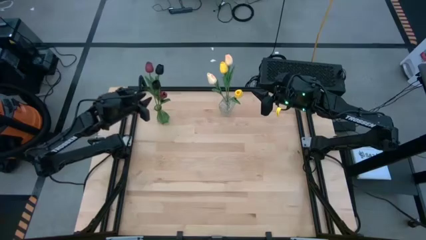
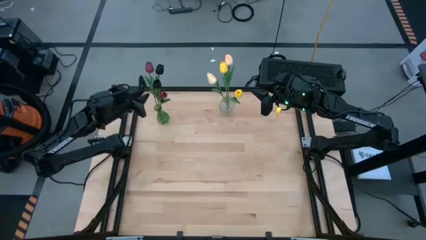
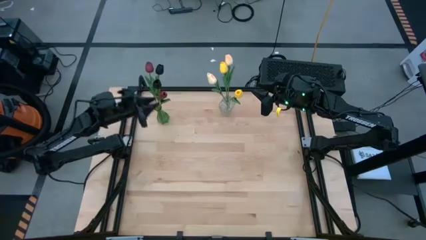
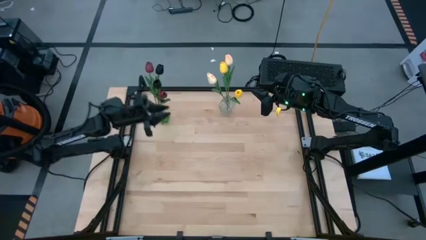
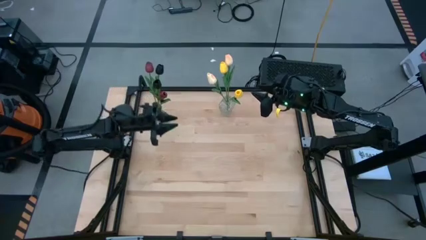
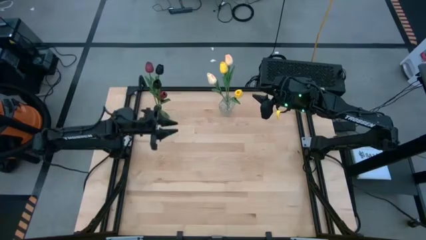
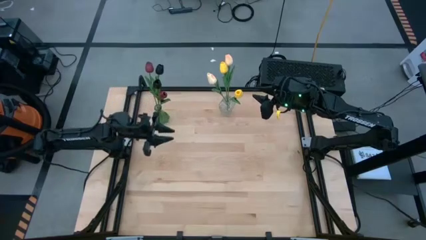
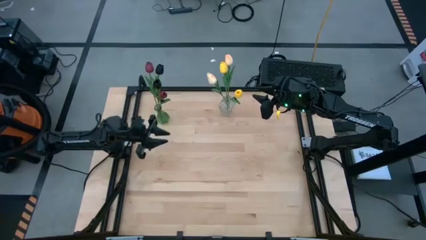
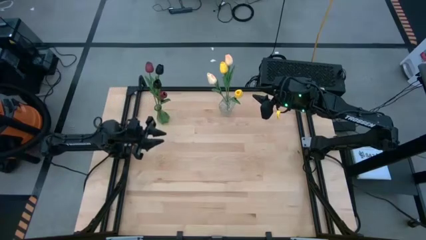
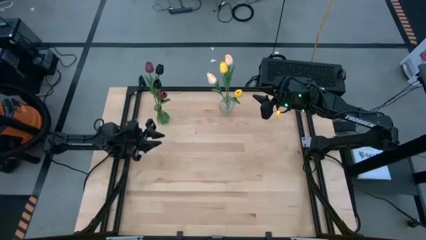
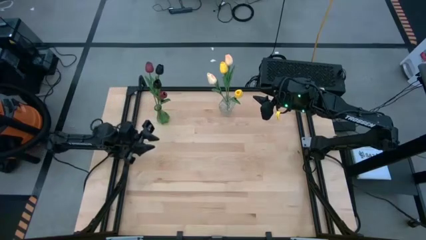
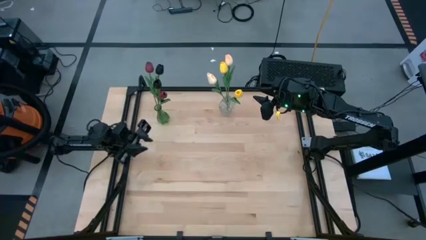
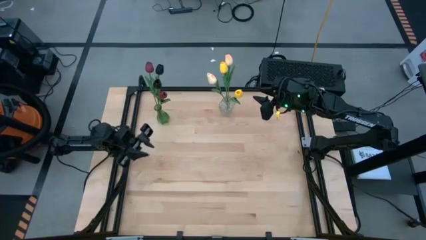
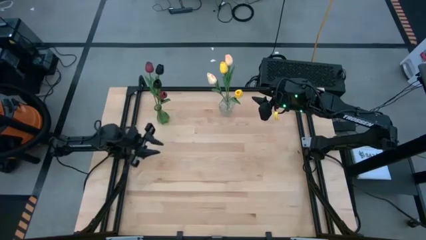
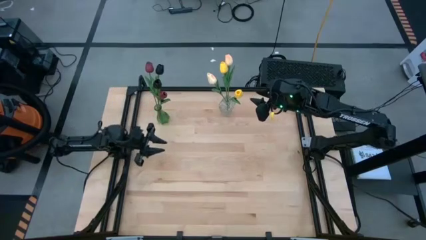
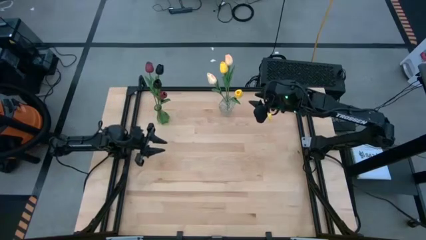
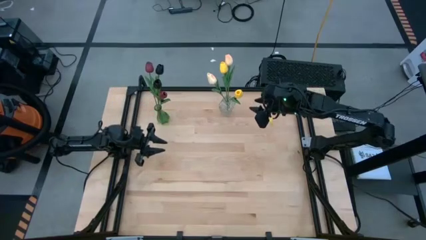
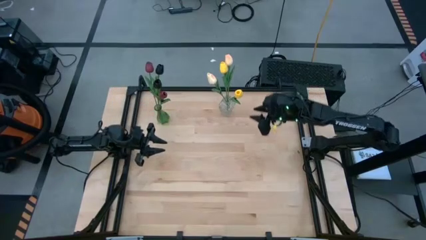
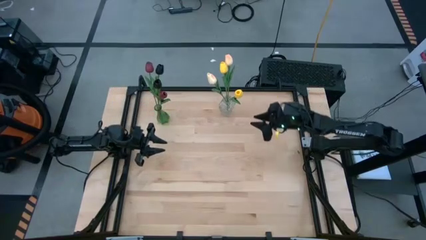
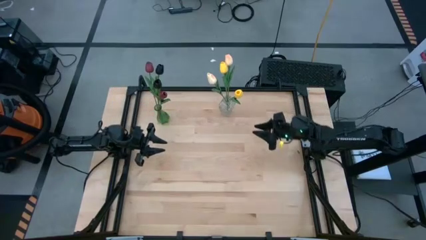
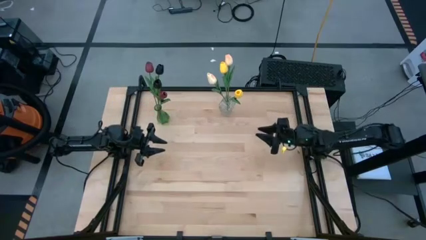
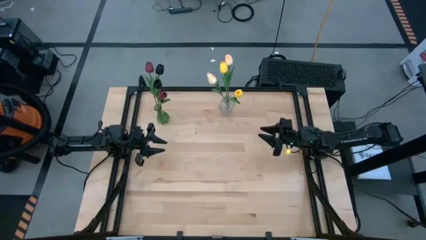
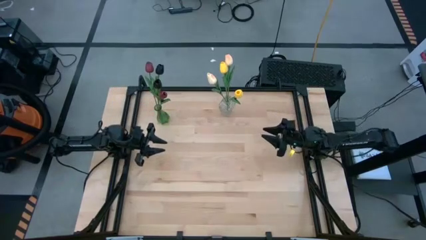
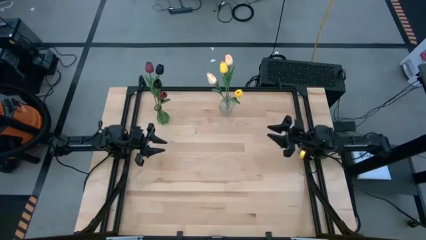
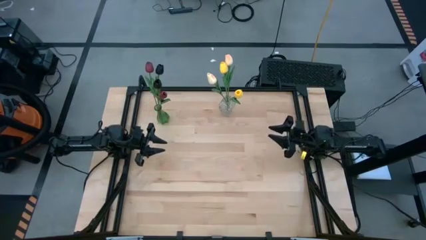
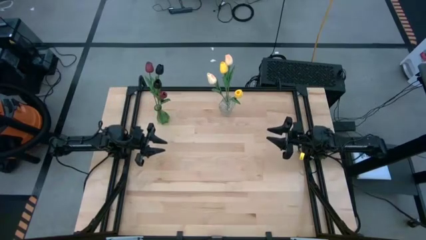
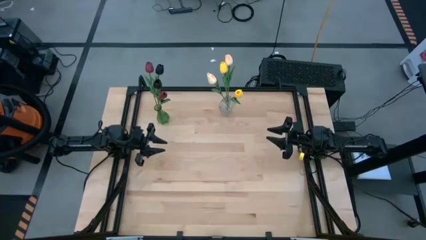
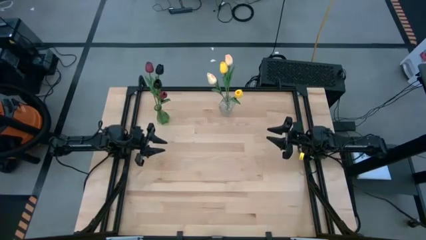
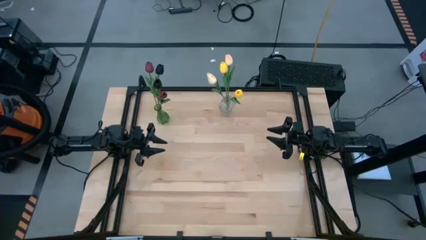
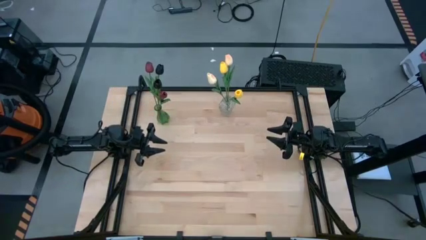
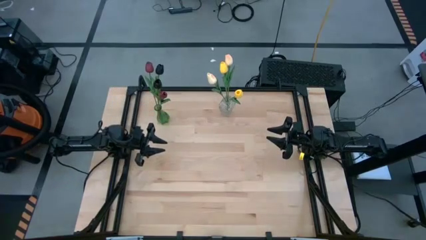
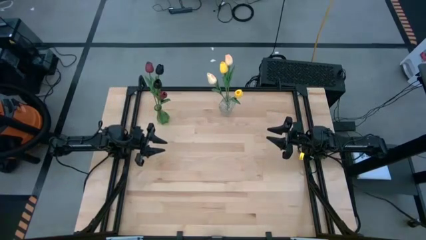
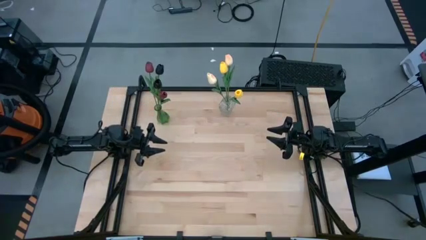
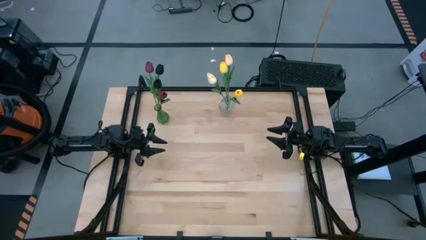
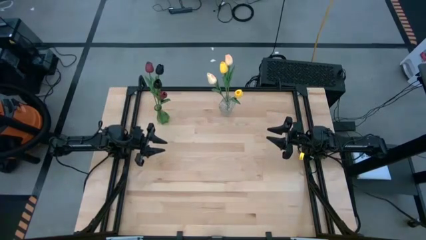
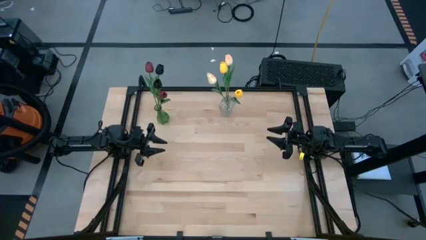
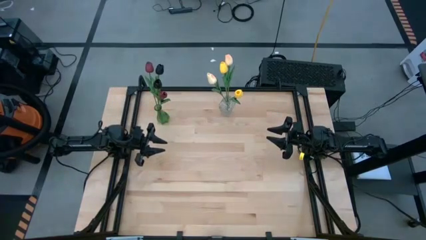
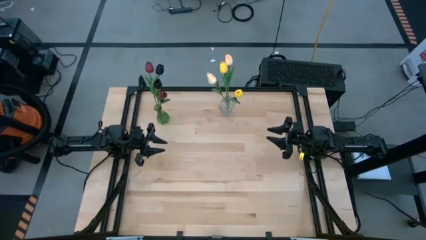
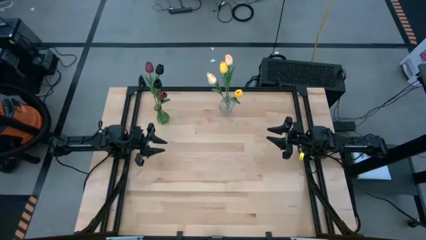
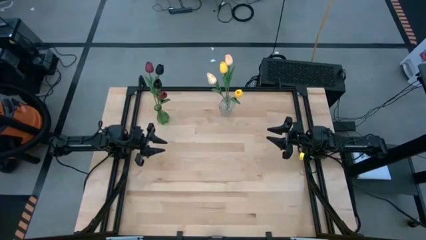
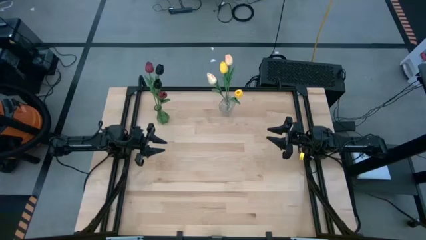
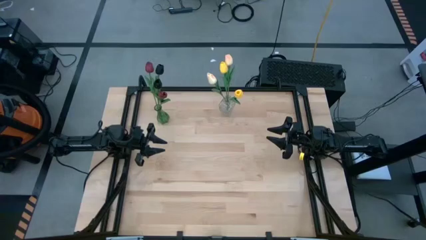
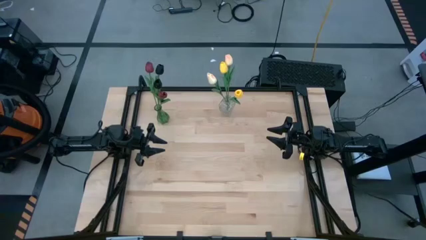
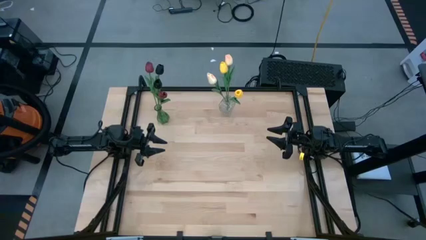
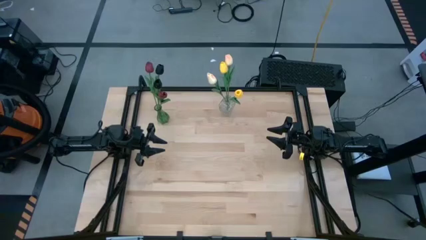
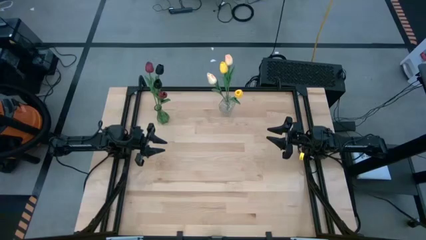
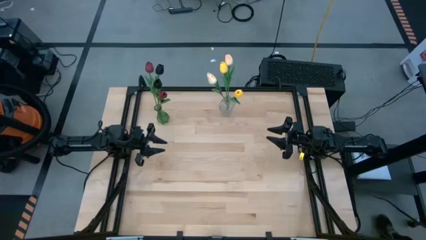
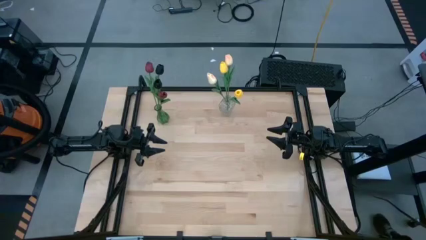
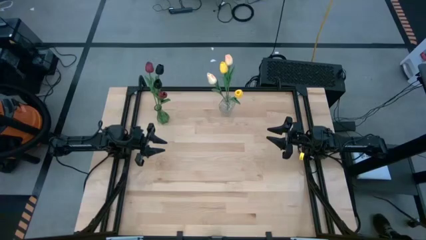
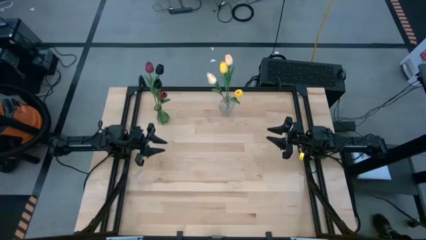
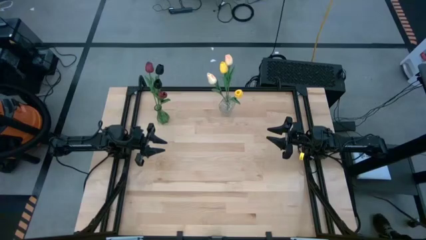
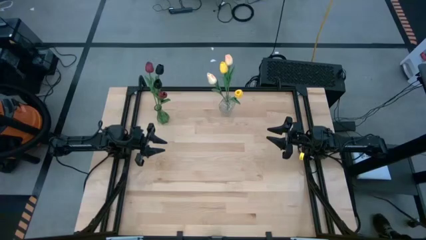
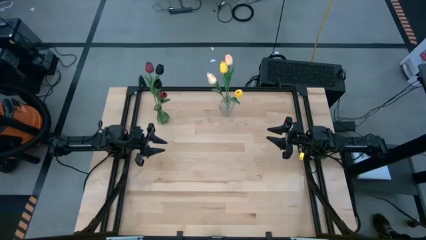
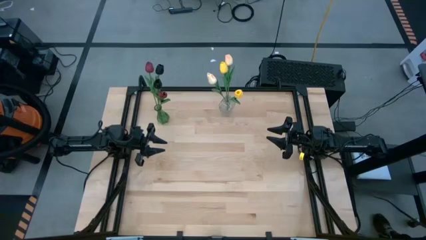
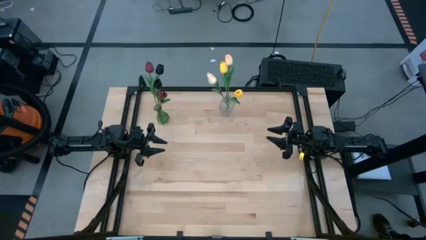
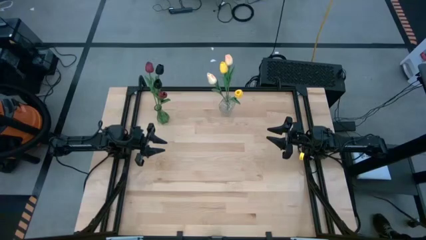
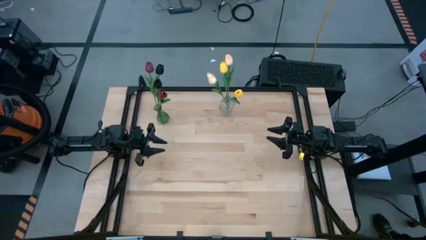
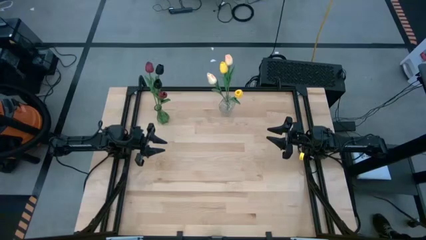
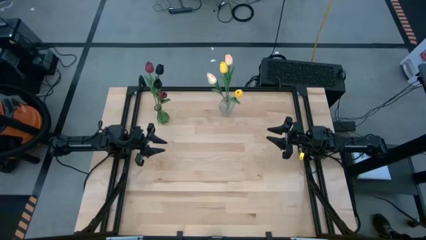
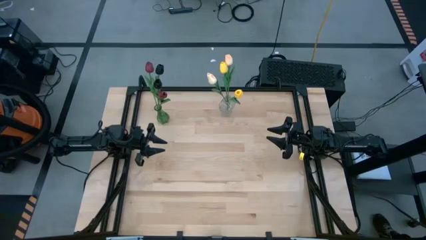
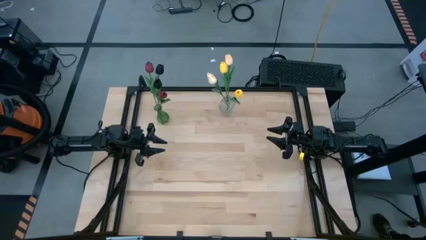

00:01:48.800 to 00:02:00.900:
Task: Sort flowers into vase by color
Return to Home Position

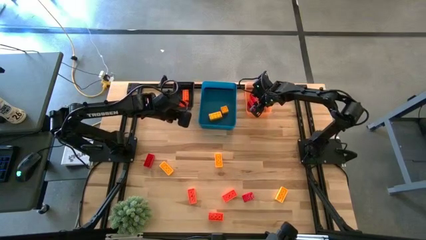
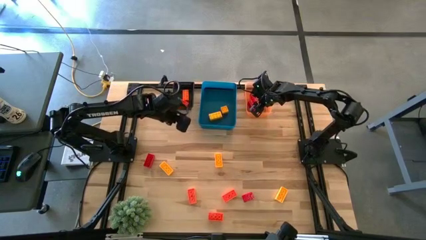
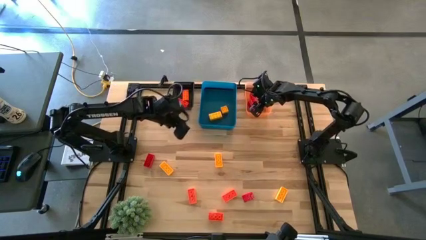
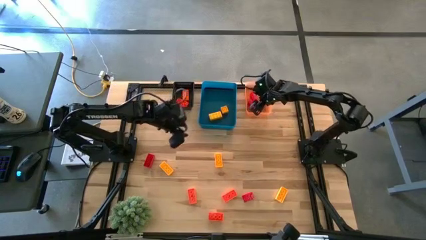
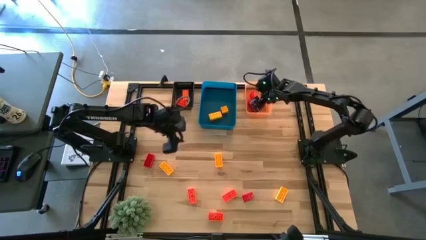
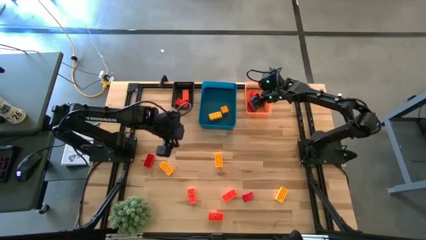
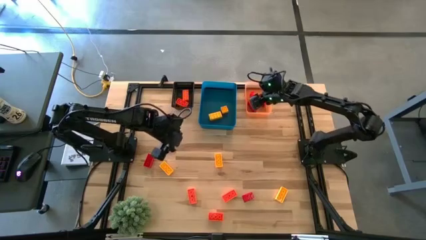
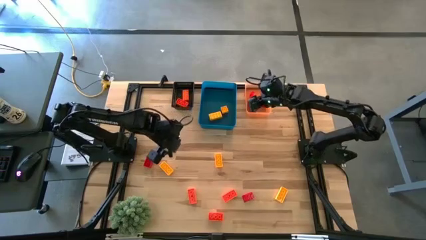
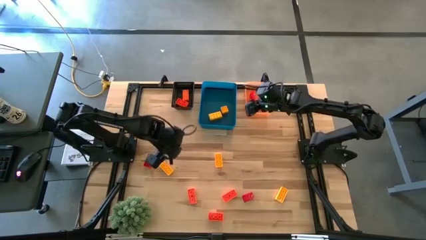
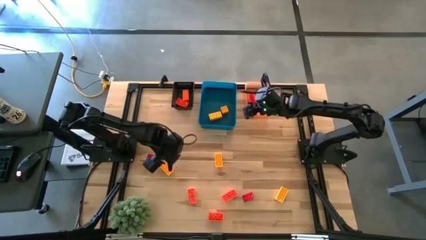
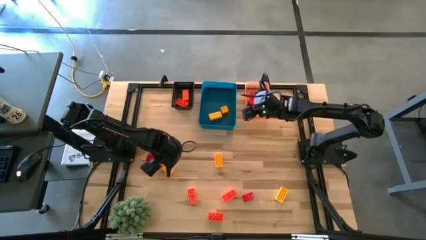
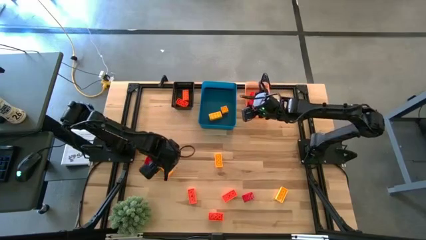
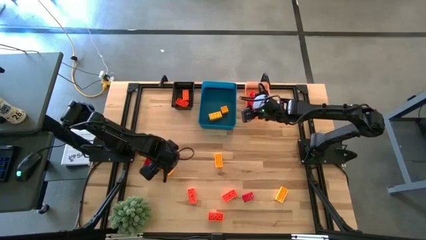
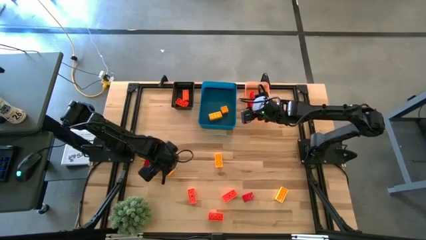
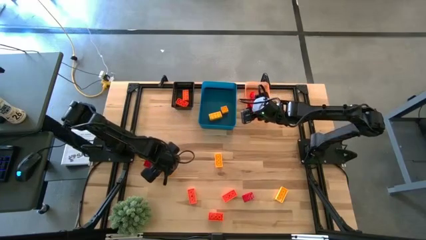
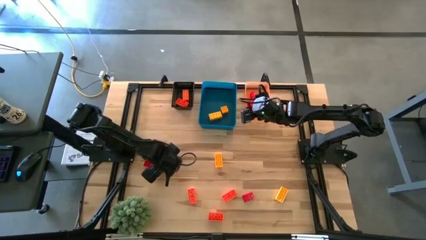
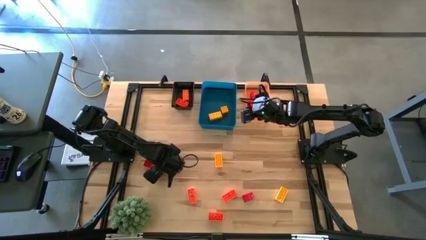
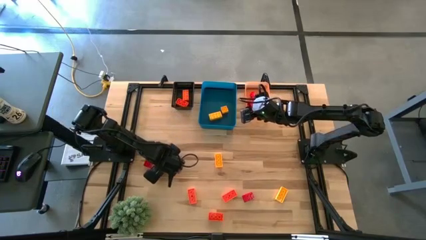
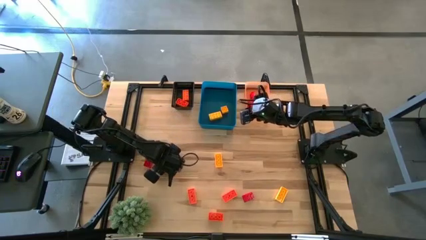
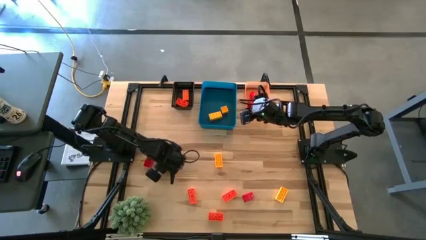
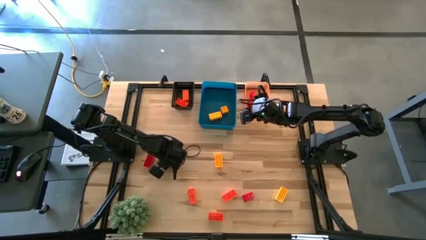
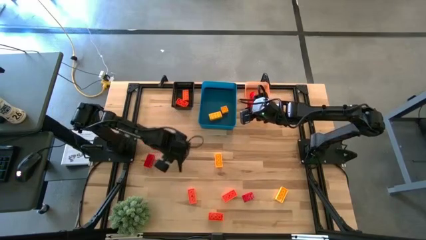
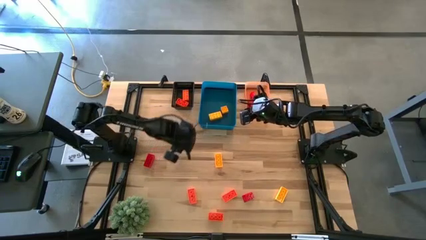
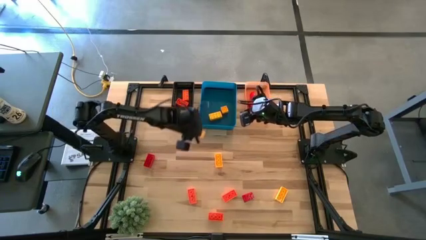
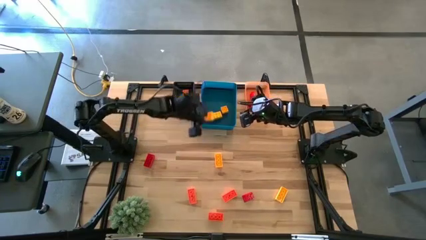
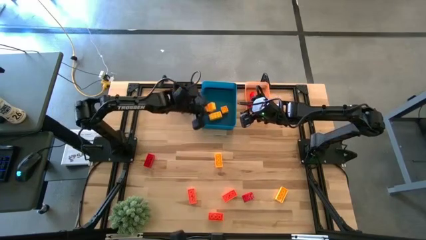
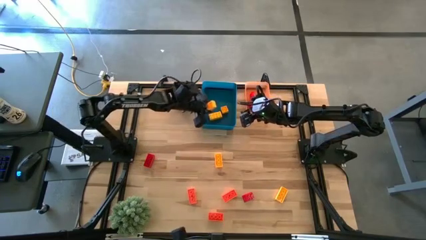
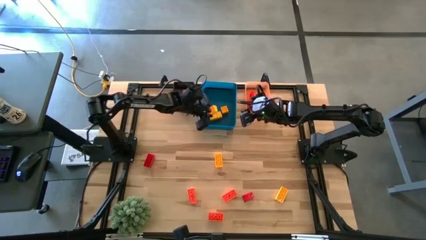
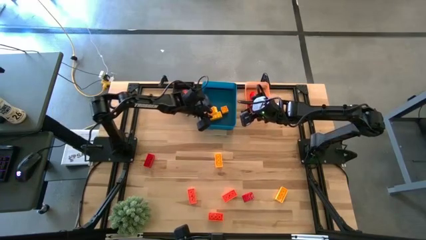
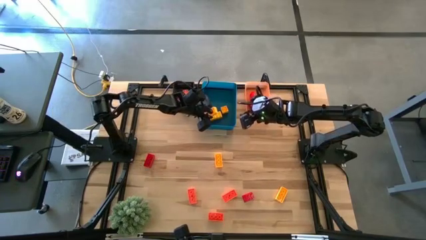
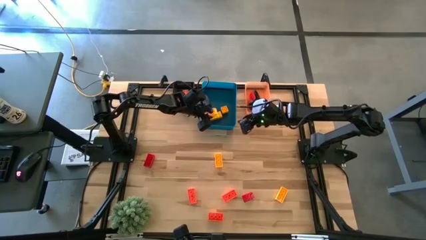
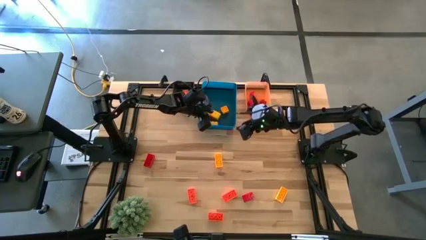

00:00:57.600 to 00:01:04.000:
Task: Sort & place blocks by color
Put the yellow game piece into the blue bin
